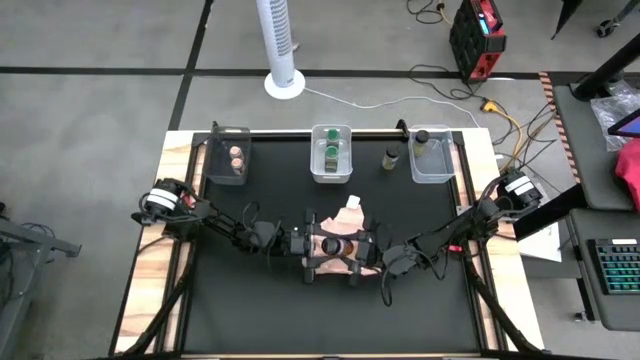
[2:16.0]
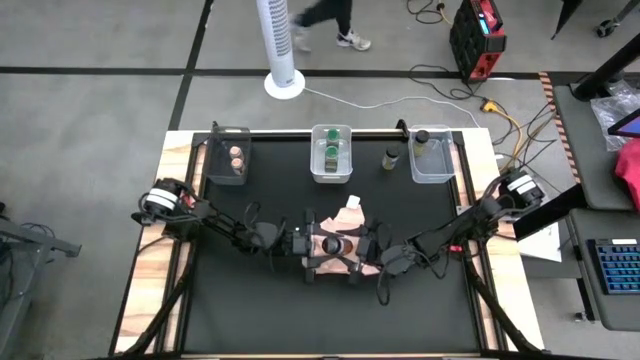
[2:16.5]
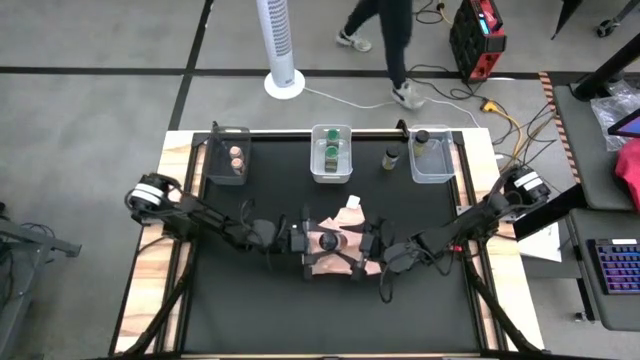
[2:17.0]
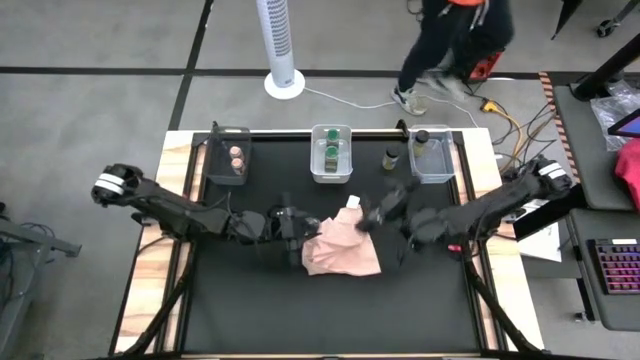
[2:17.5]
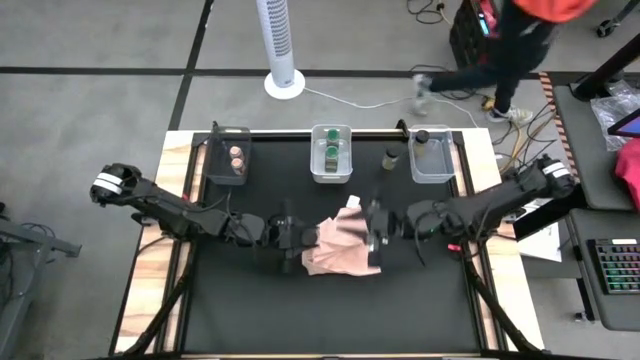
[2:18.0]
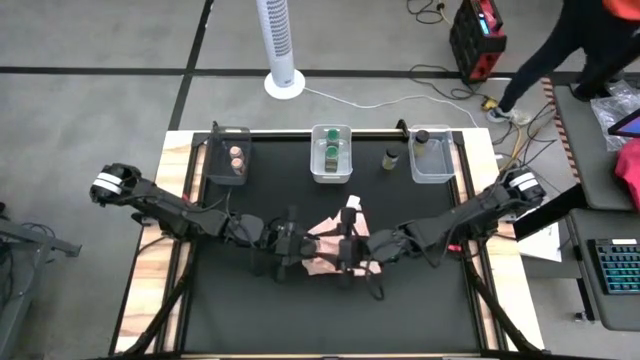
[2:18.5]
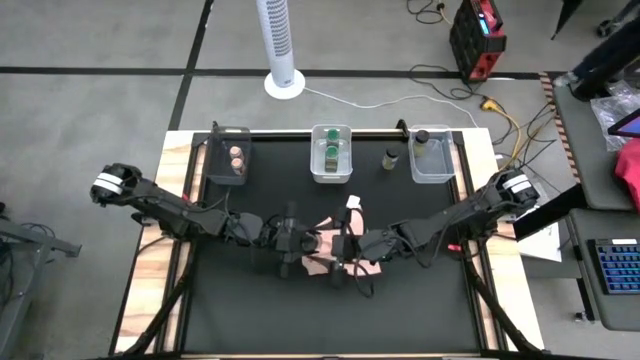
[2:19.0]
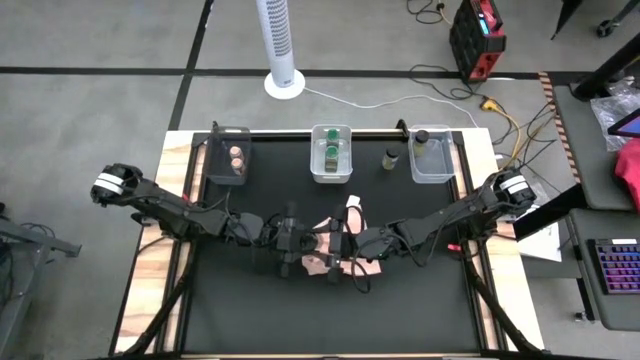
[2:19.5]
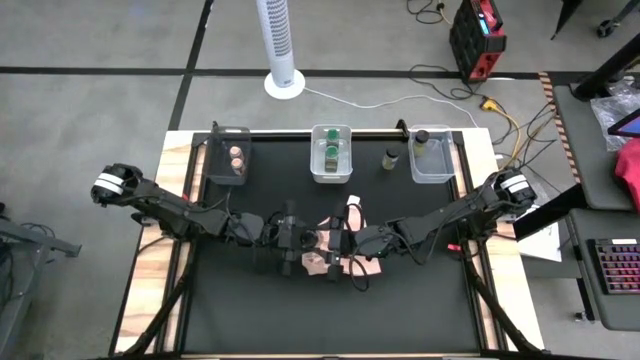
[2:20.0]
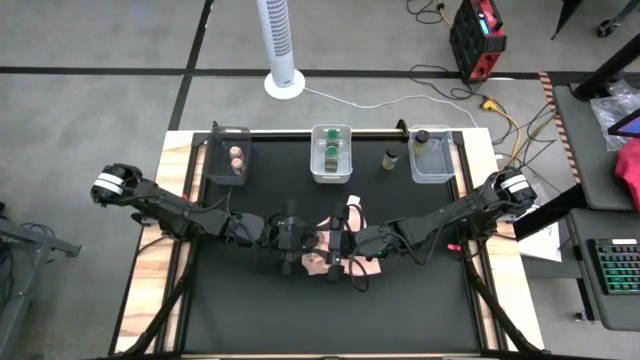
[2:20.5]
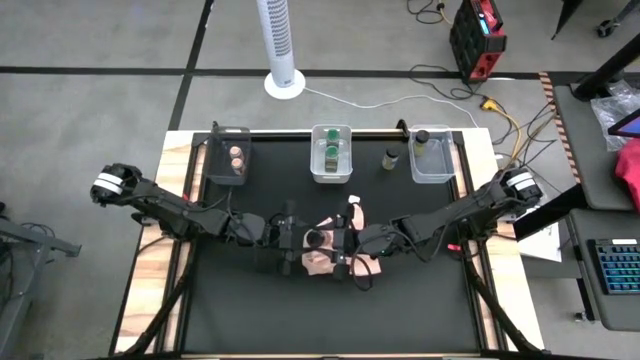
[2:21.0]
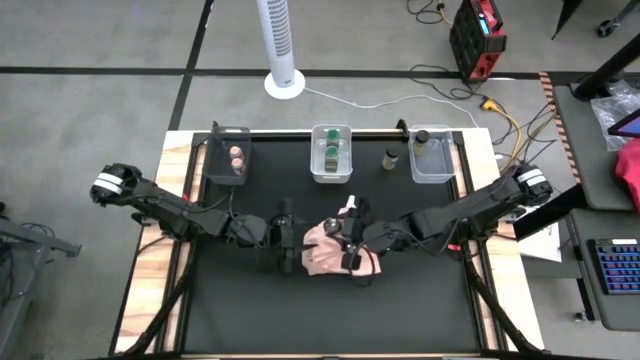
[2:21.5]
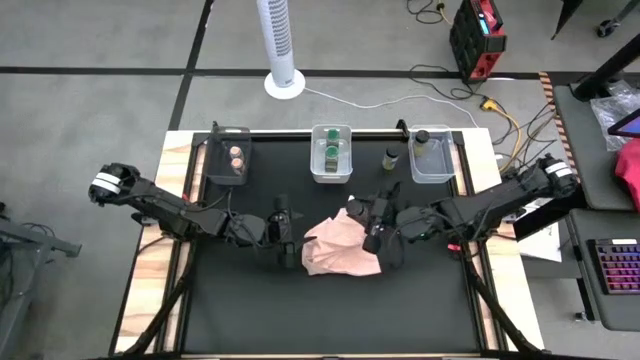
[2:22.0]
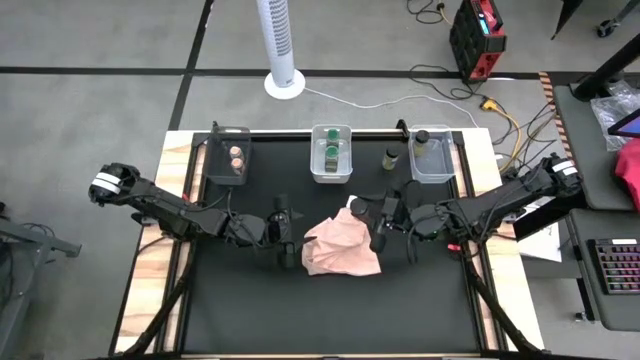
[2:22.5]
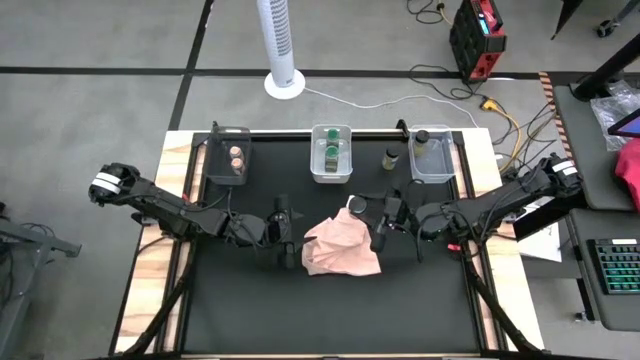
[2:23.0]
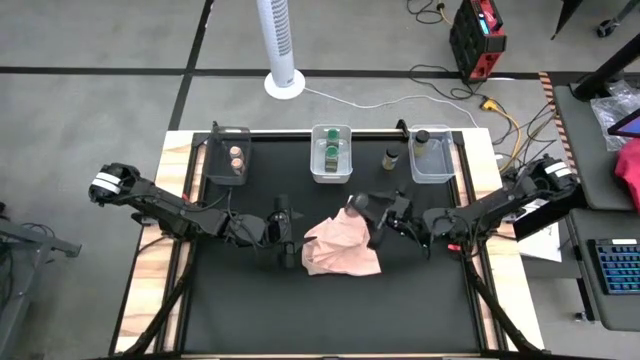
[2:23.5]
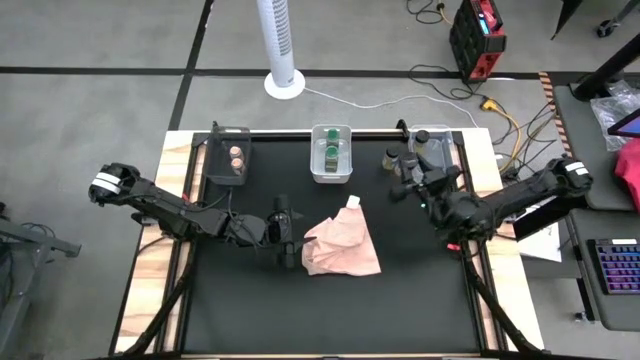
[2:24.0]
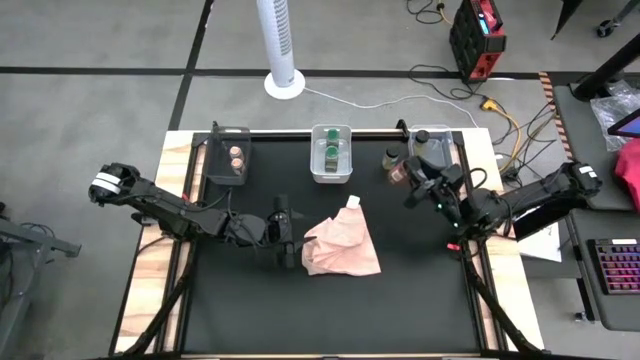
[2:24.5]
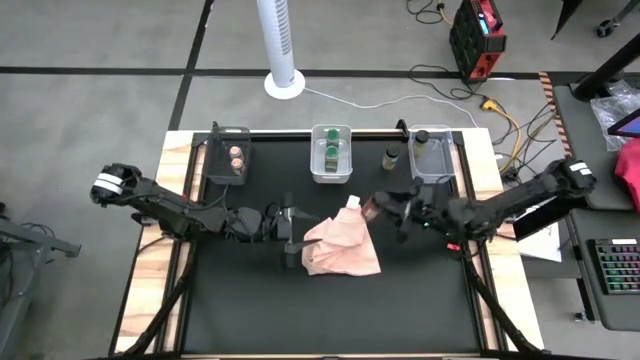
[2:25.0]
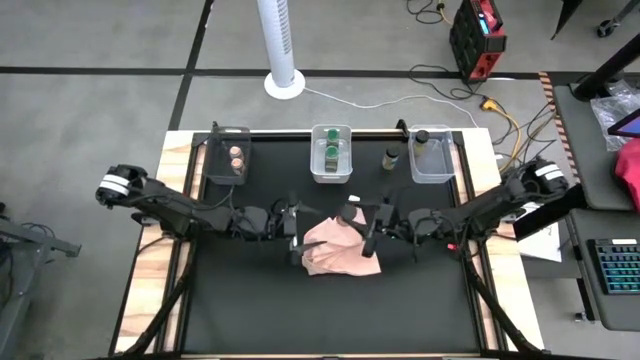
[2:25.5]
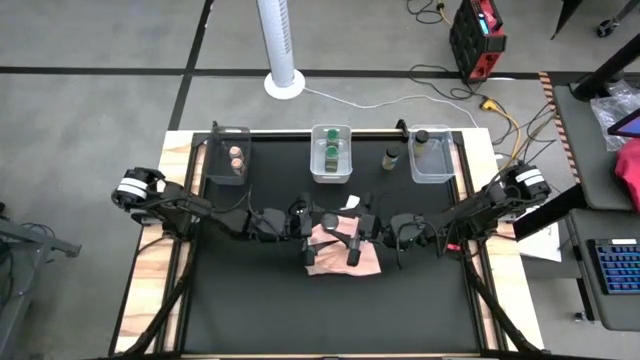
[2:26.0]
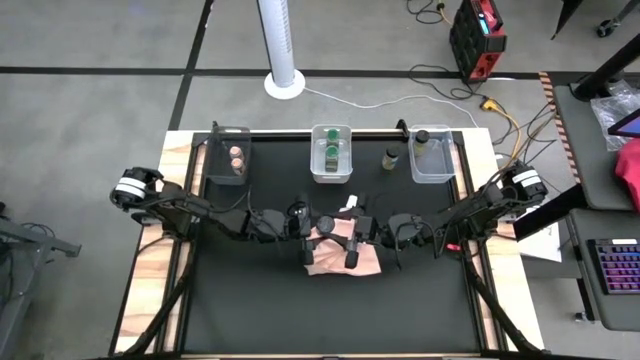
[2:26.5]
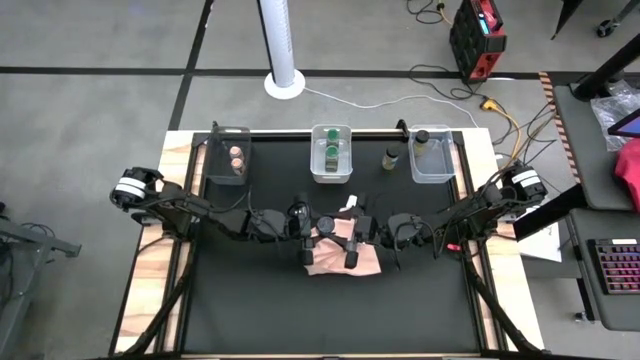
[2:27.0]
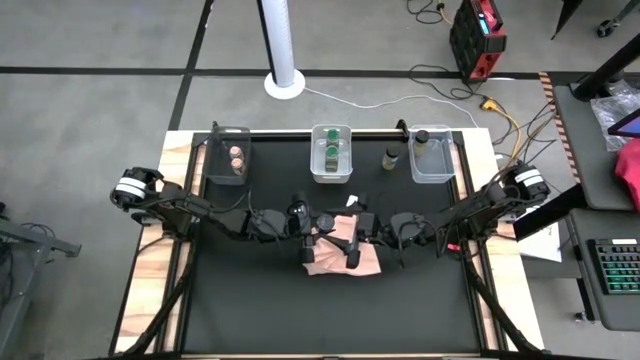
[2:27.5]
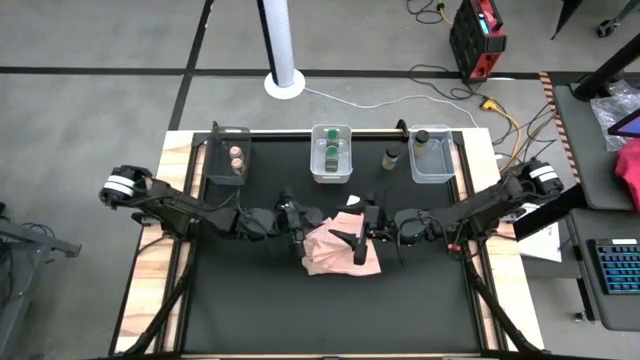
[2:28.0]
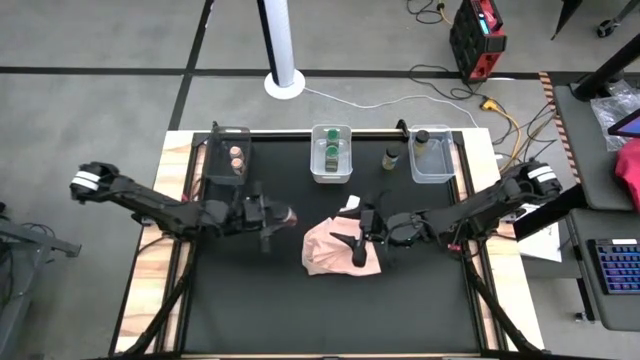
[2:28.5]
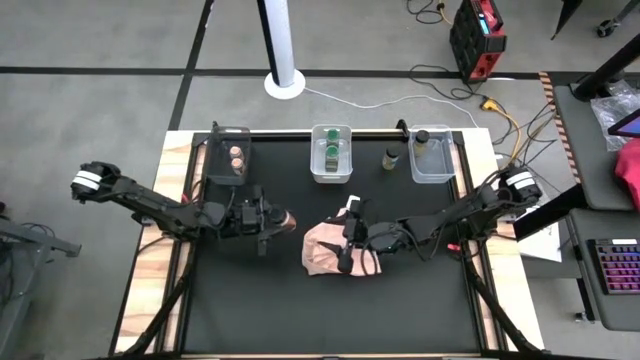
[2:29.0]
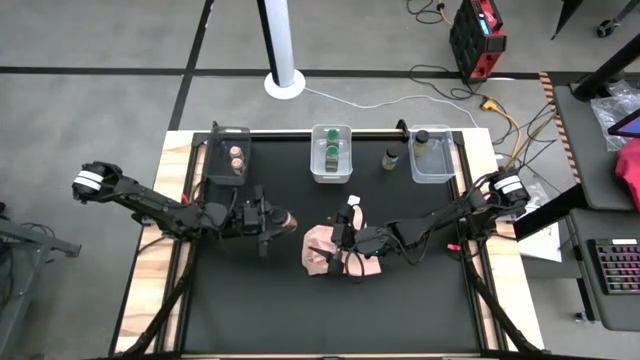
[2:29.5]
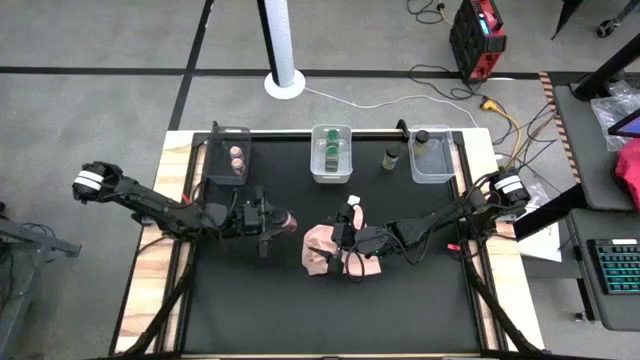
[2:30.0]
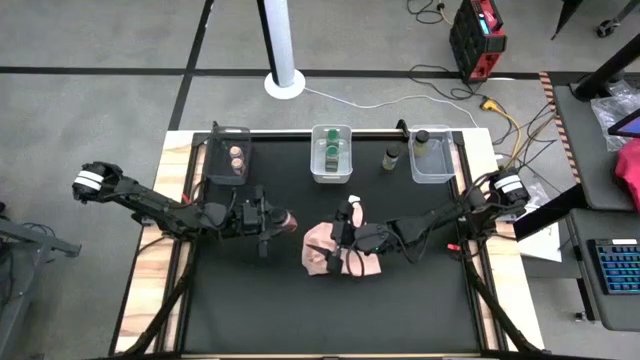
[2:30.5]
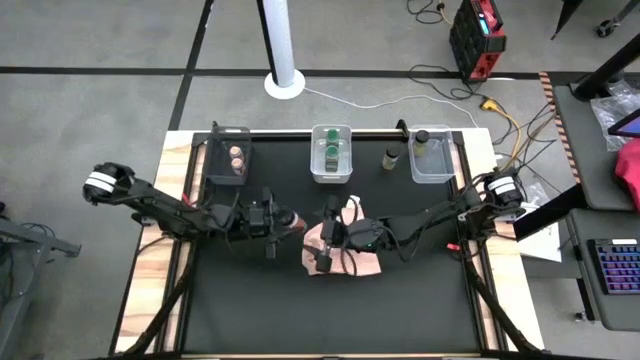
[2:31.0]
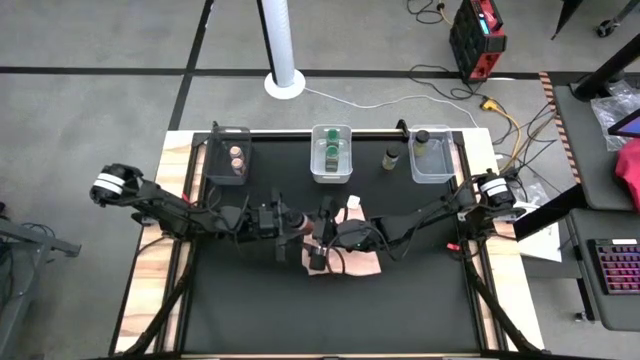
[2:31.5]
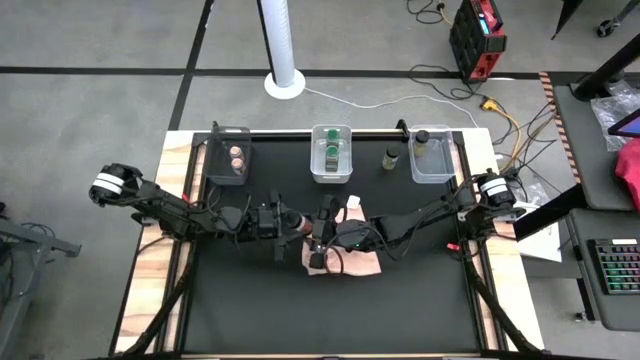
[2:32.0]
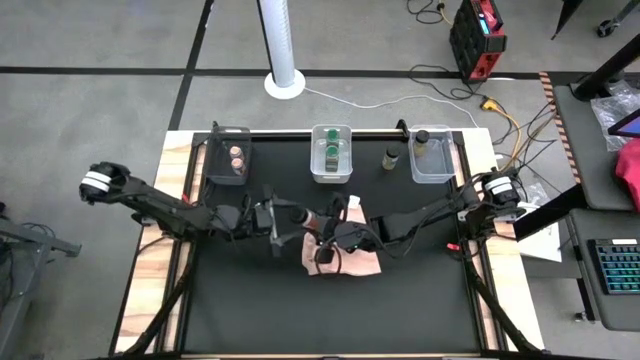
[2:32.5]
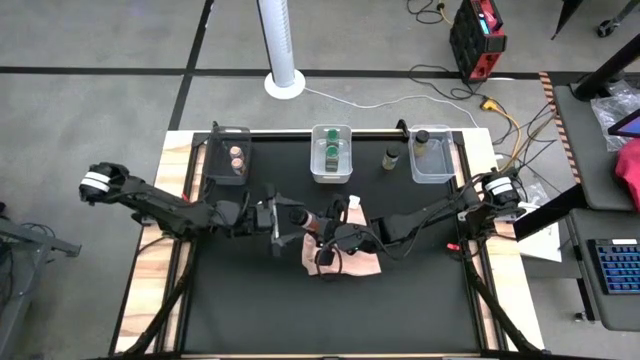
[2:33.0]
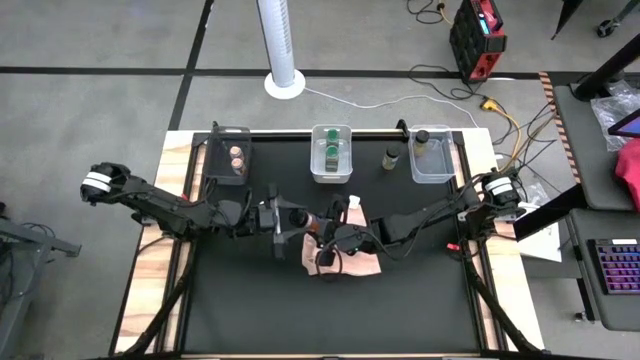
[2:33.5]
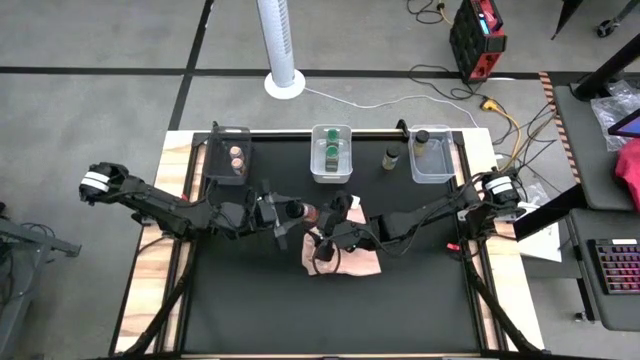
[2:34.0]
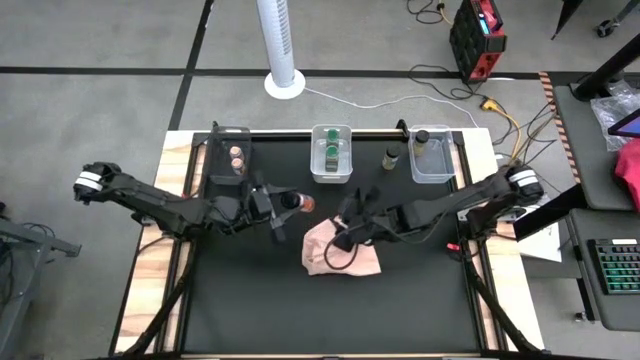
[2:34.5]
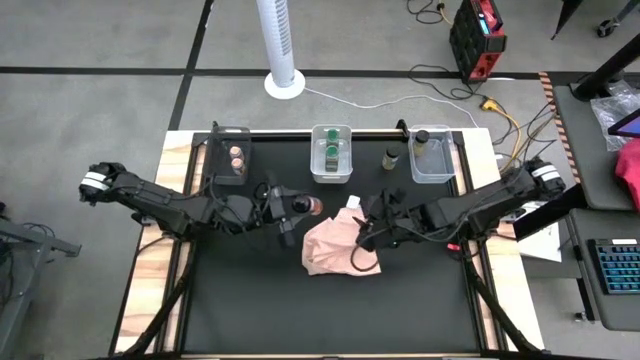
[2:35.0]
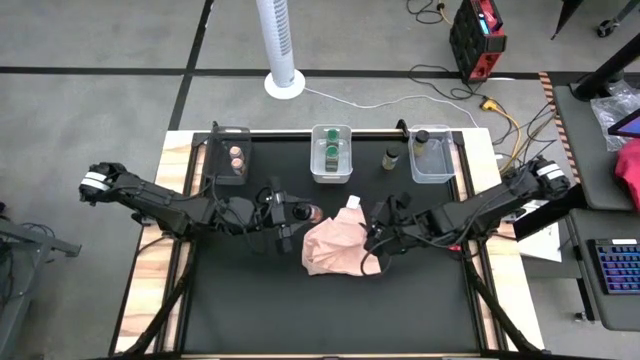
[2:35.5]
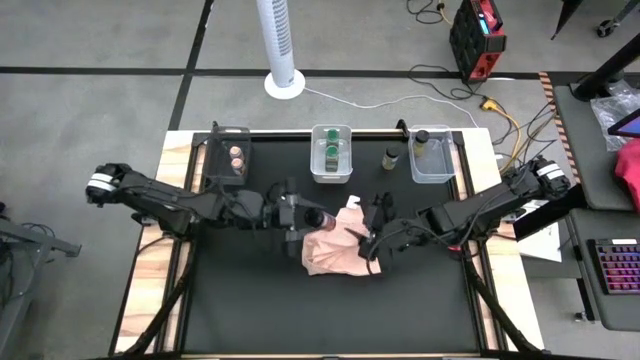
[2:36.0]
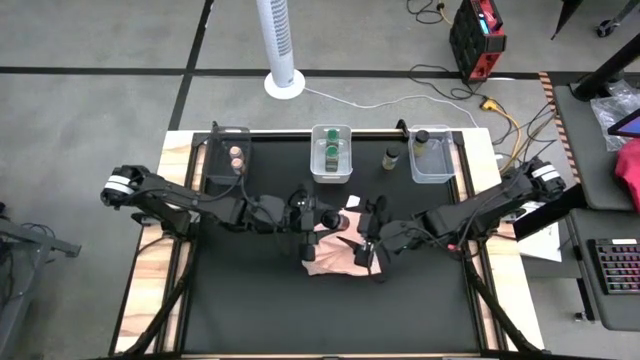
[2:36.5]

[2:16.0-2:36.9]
Task: Sort spices by type
Put the black brown spice bottle into the transparent bin
